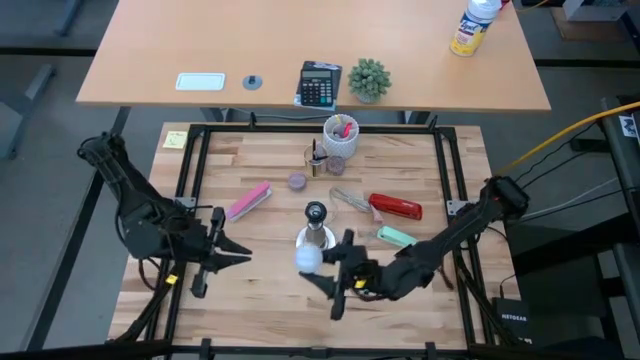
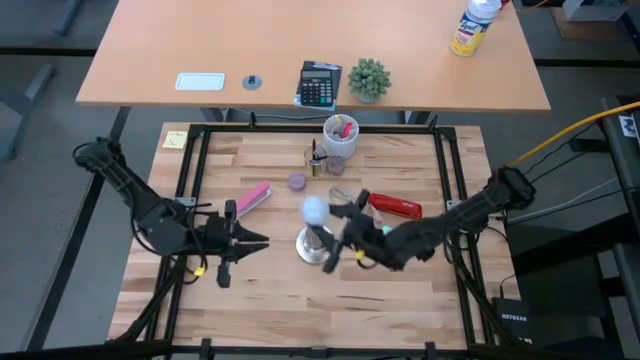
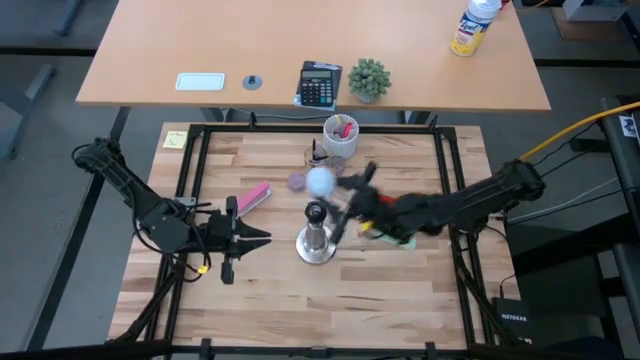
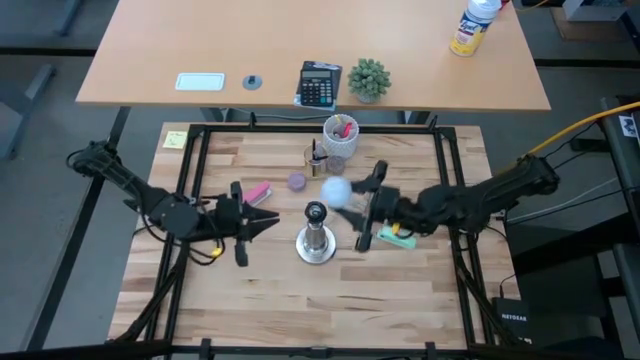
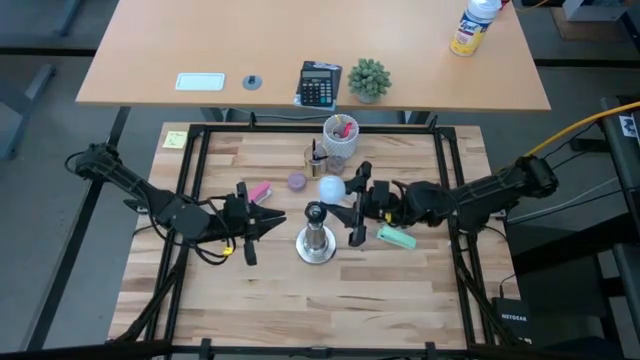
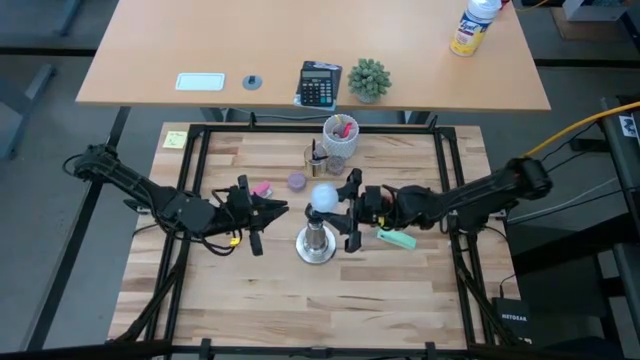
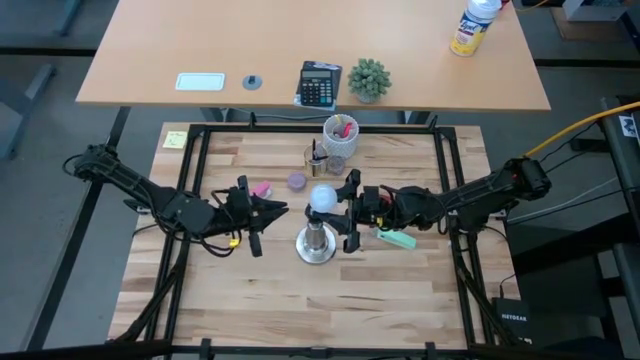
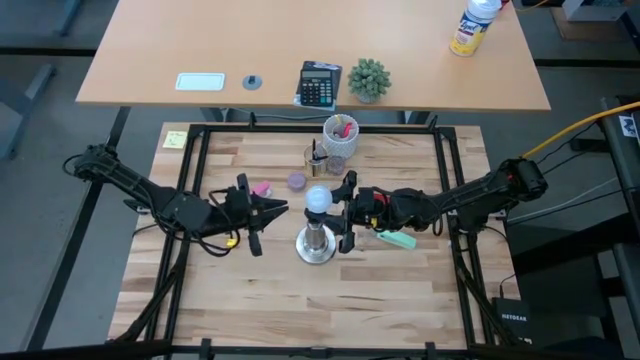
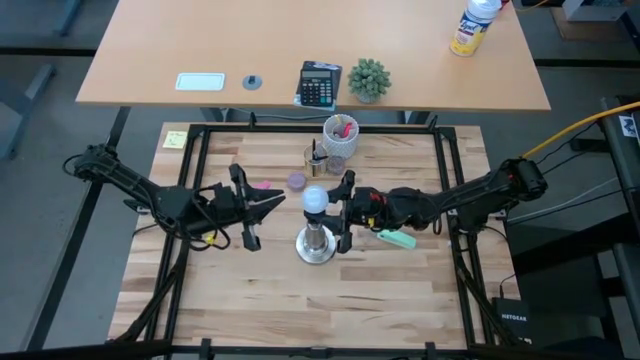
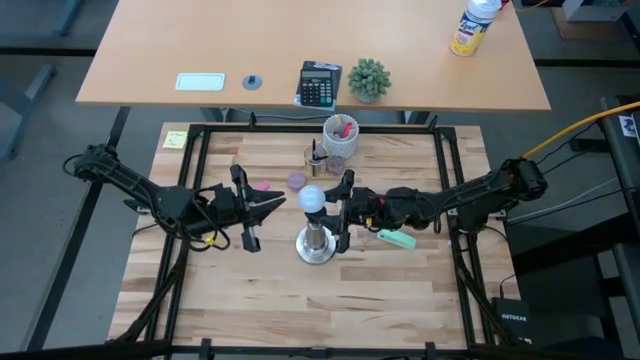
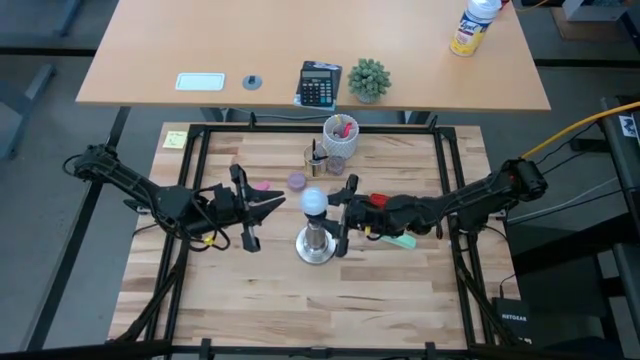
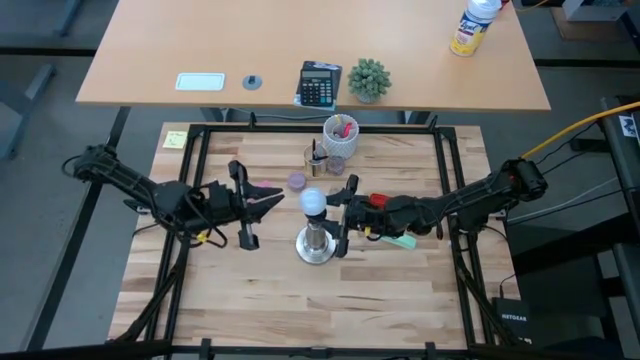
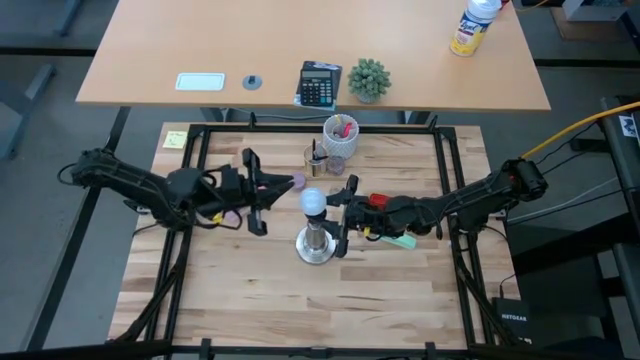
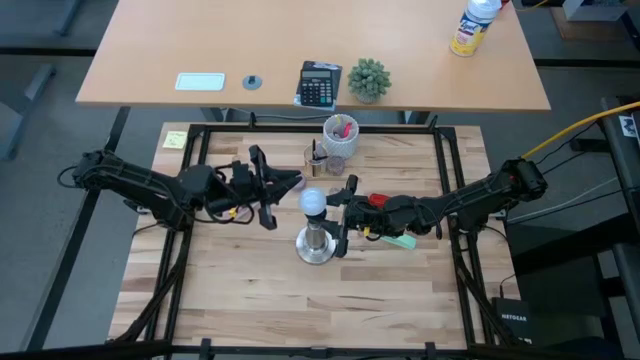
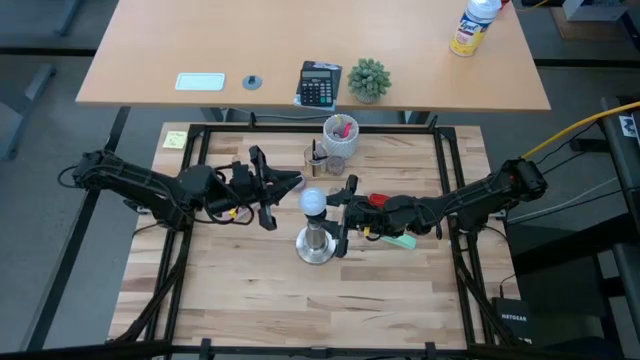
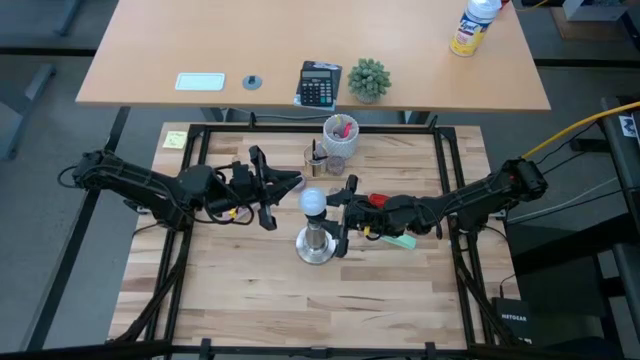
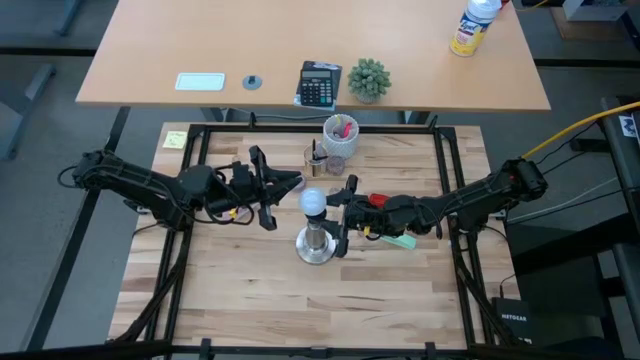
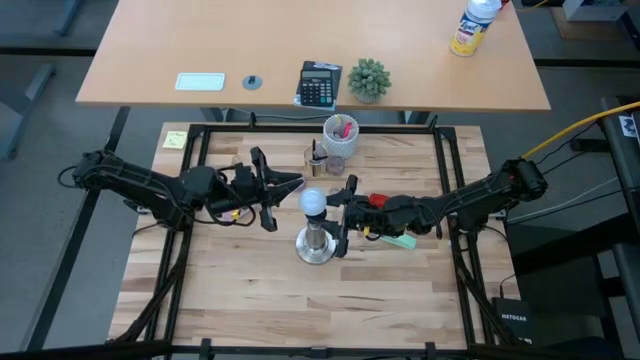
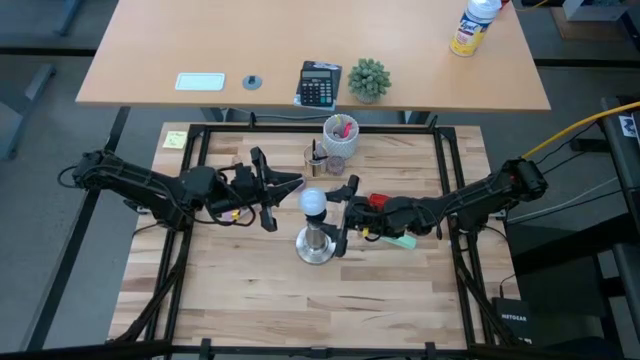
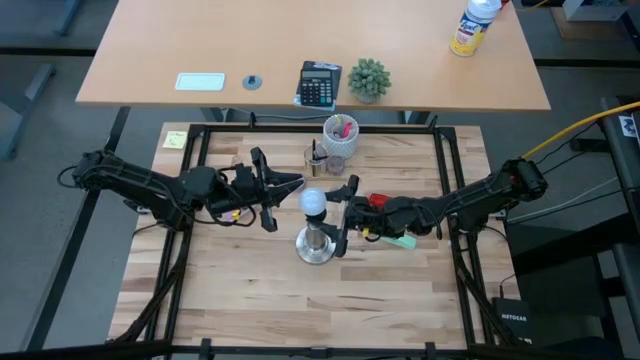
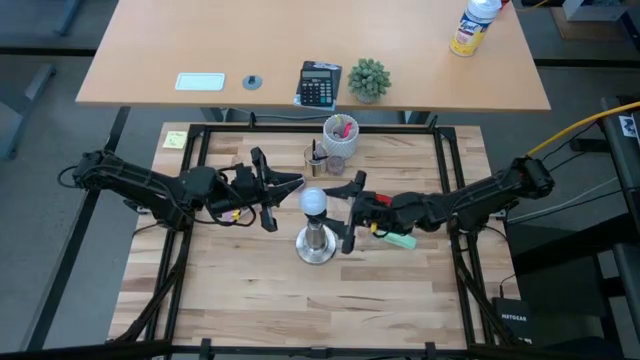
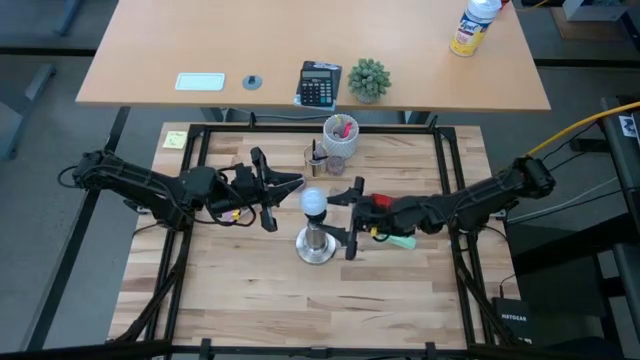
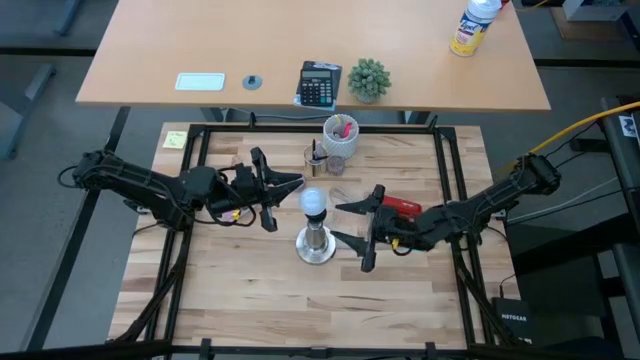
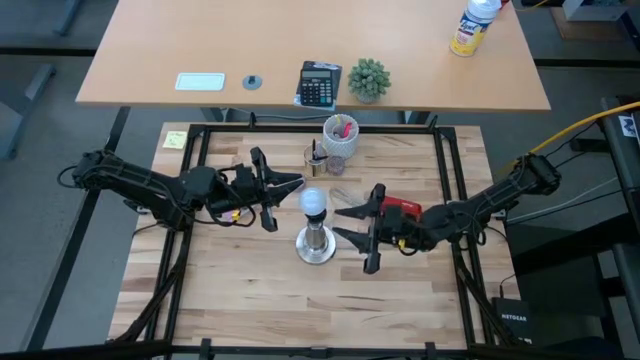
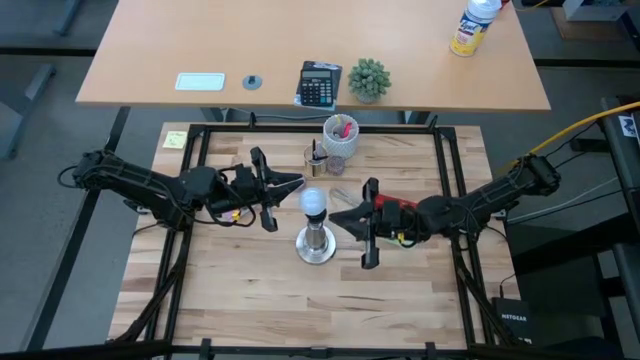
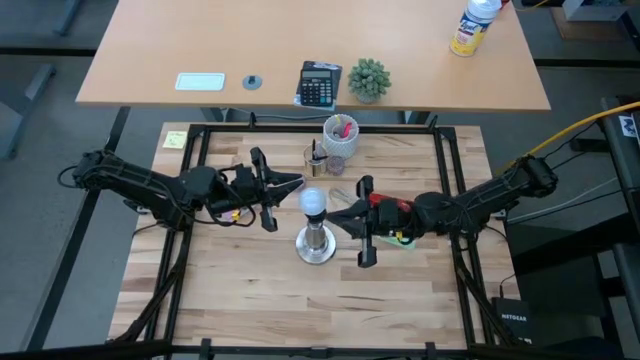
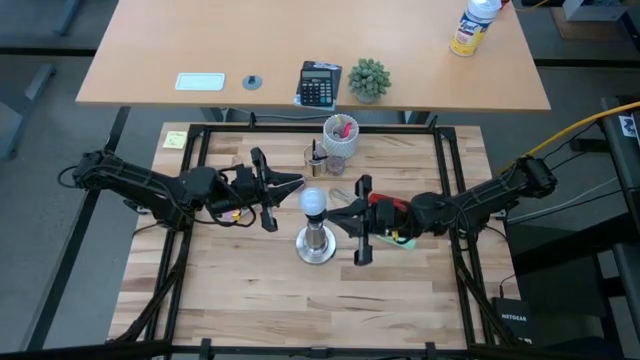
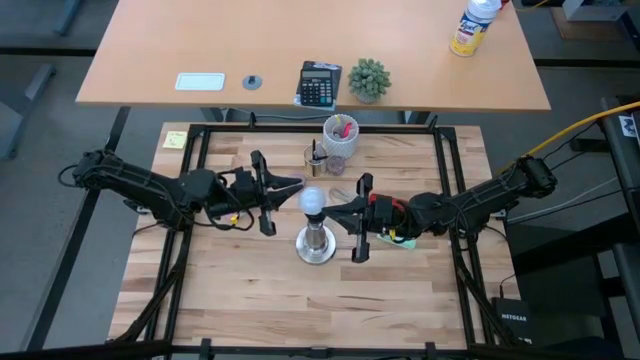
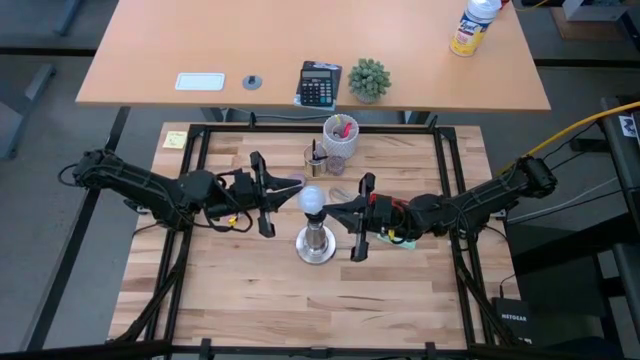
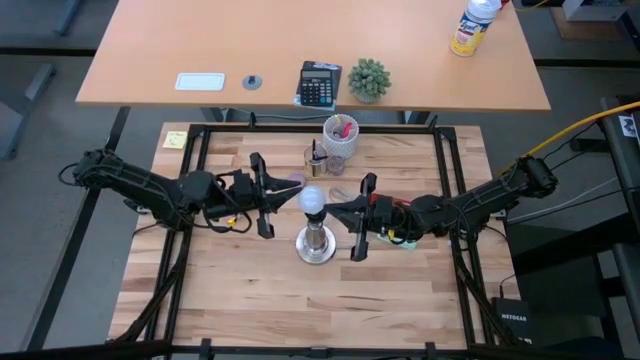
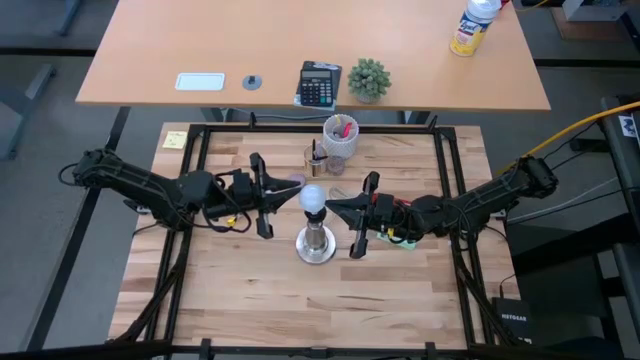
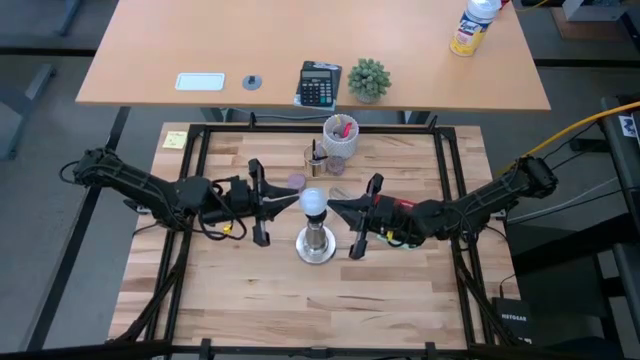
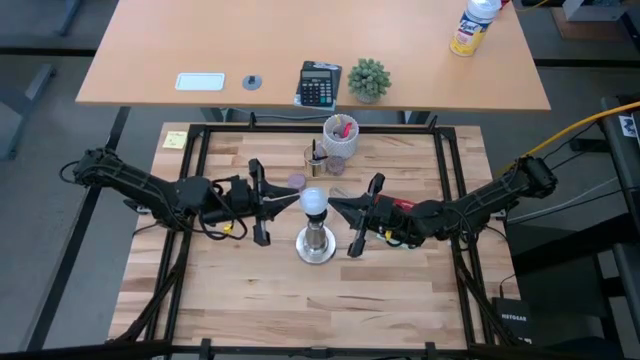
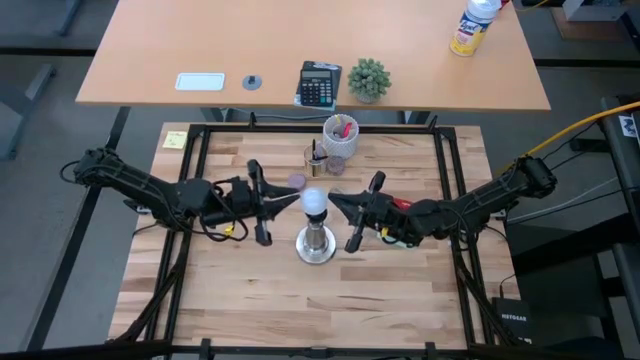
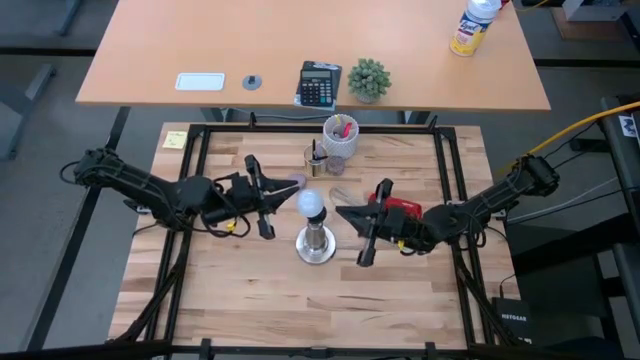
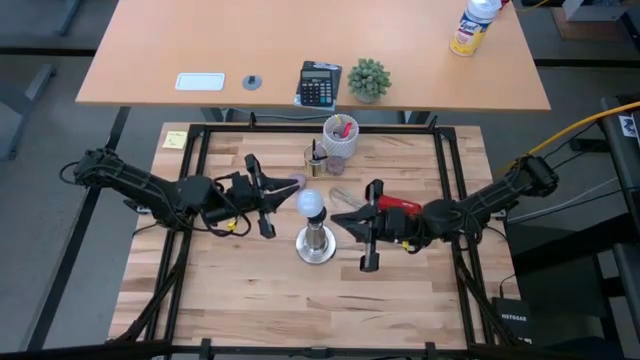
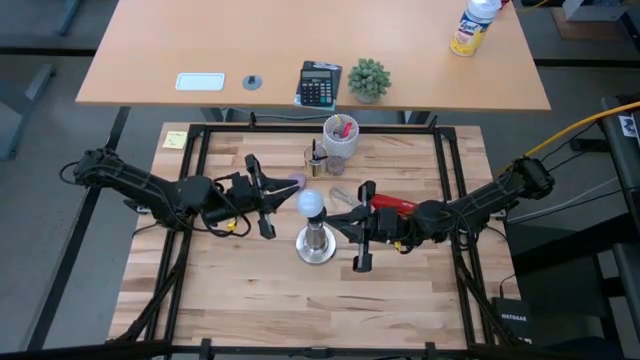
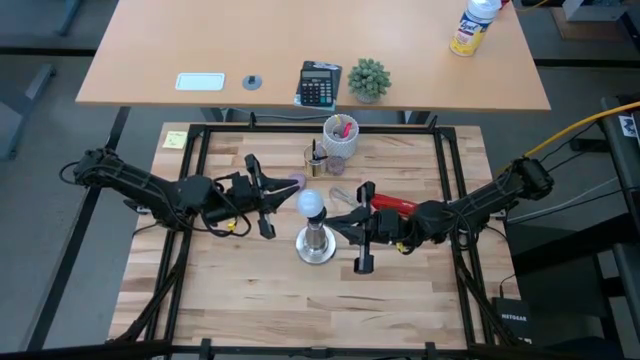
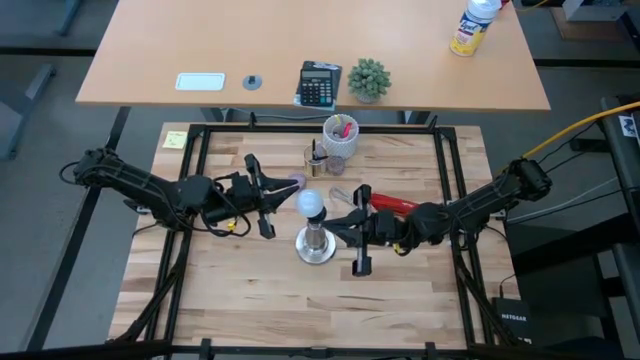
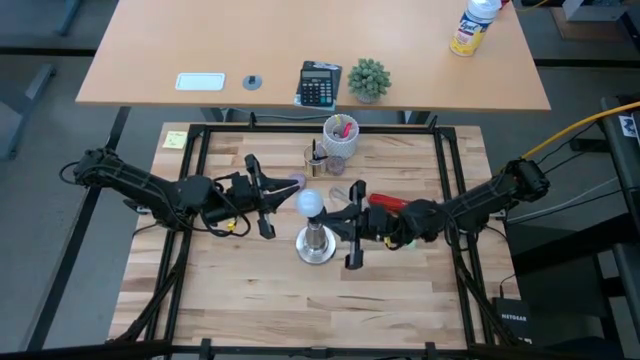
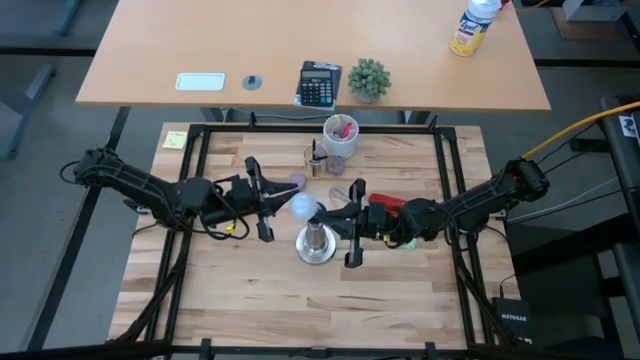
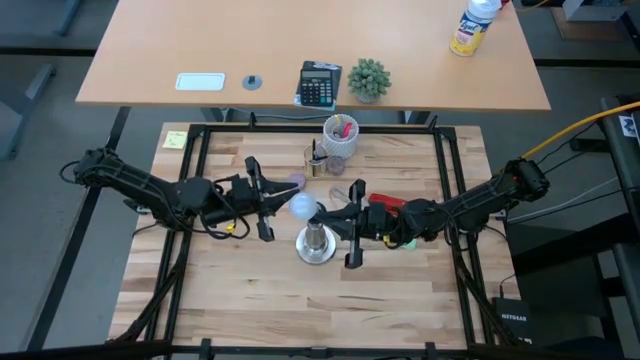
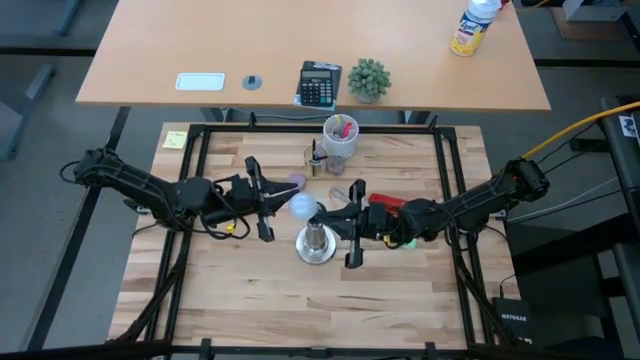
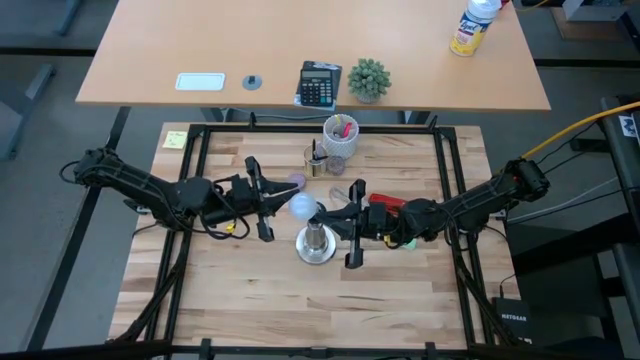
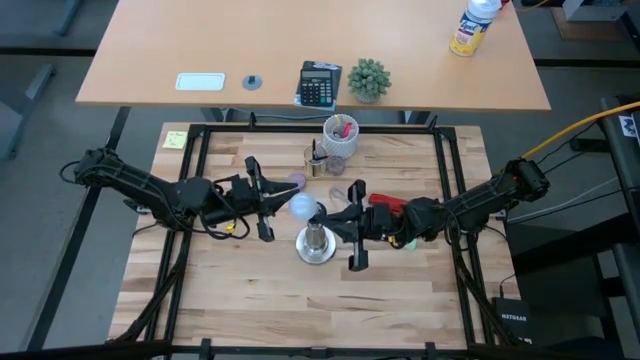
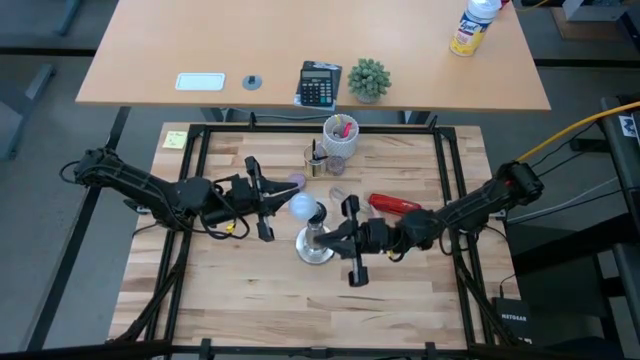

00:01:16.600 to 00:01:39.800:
Task: Screw lightbulb
Insert the lightbulb into the lamp socket
